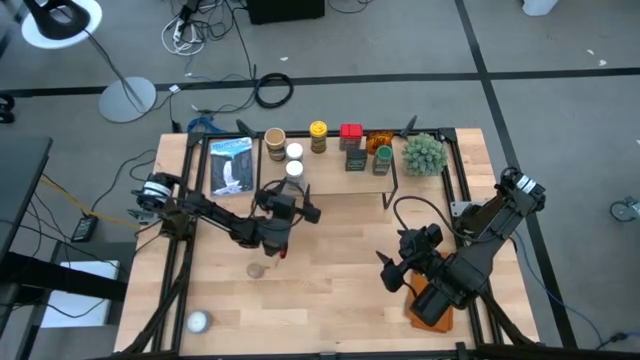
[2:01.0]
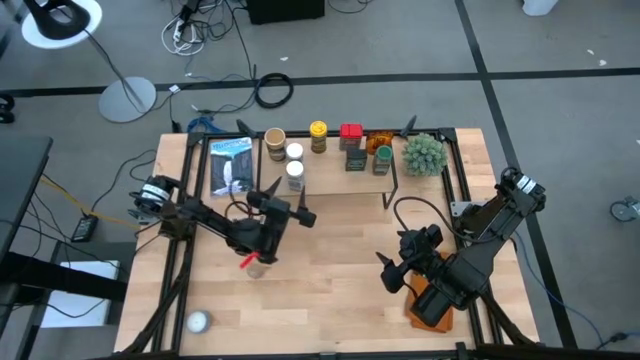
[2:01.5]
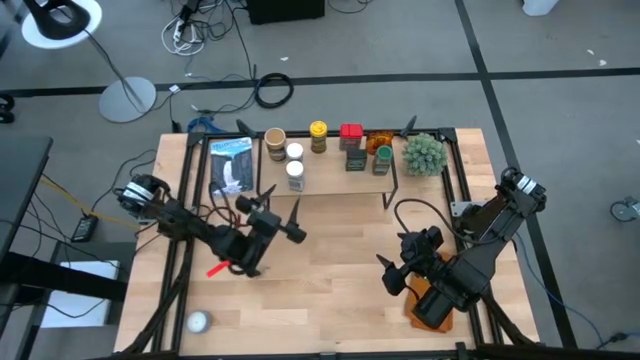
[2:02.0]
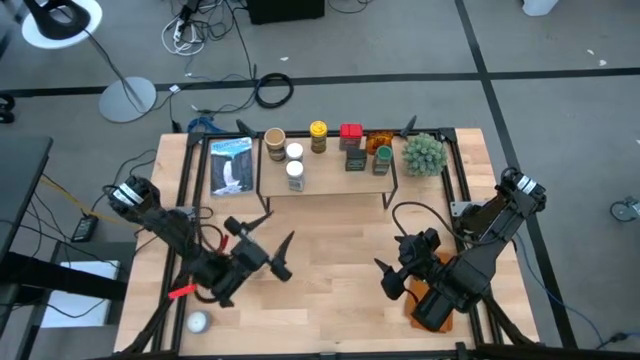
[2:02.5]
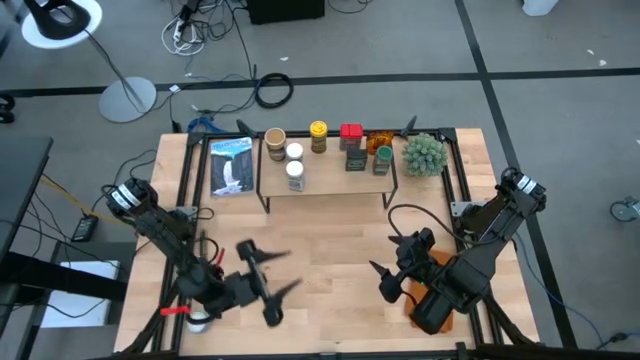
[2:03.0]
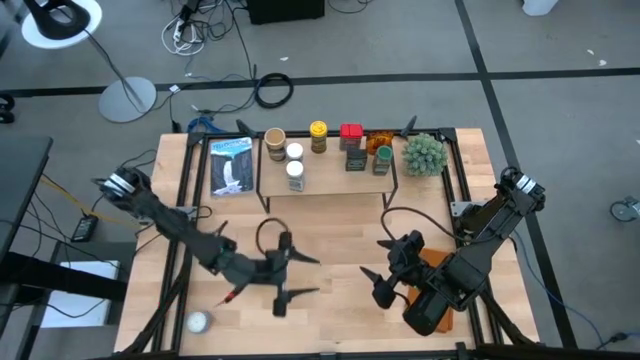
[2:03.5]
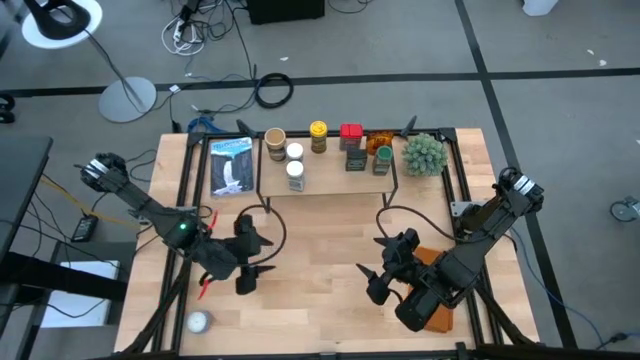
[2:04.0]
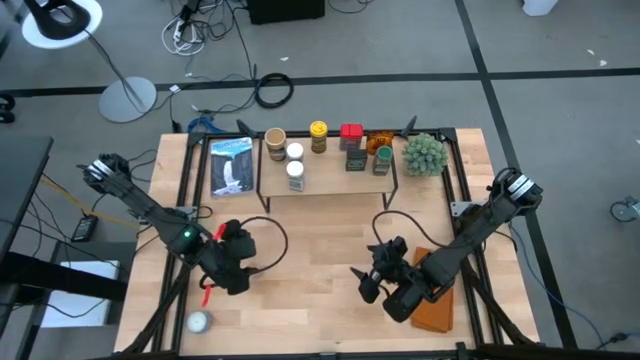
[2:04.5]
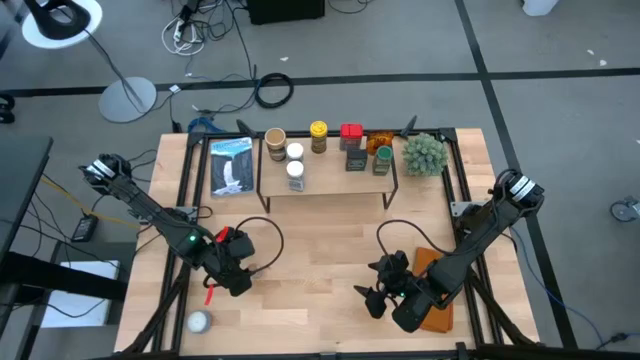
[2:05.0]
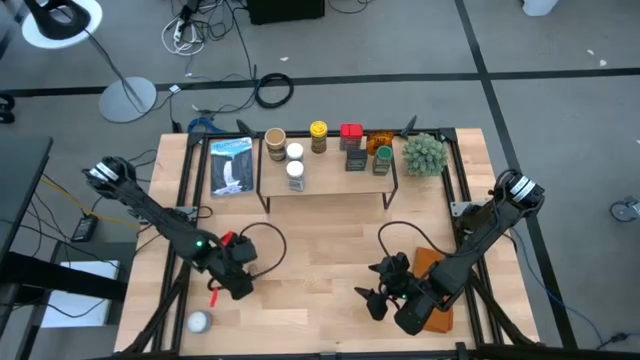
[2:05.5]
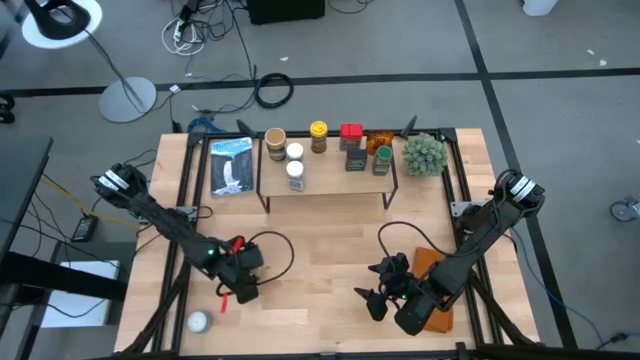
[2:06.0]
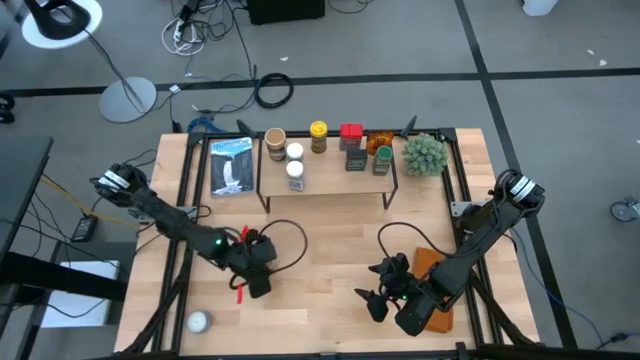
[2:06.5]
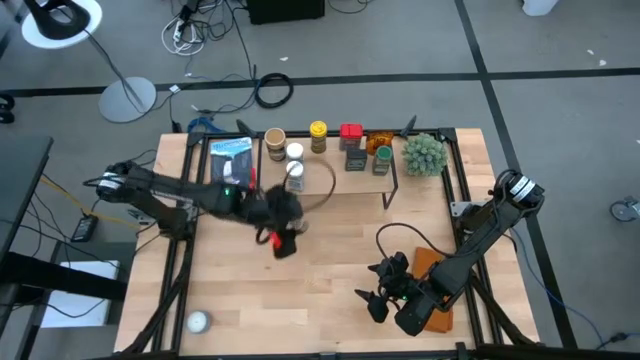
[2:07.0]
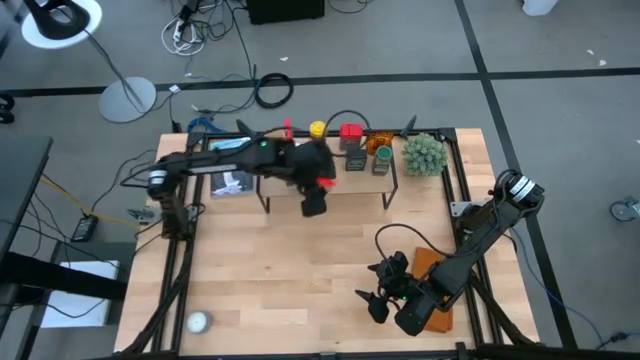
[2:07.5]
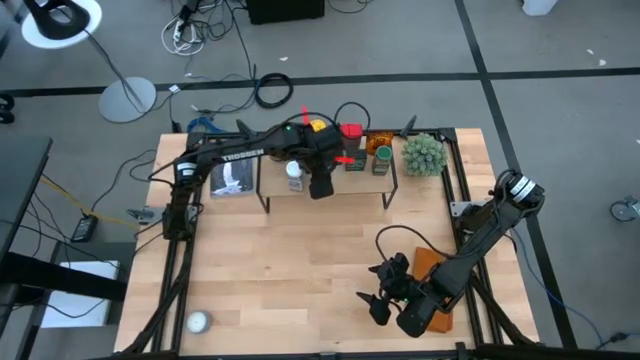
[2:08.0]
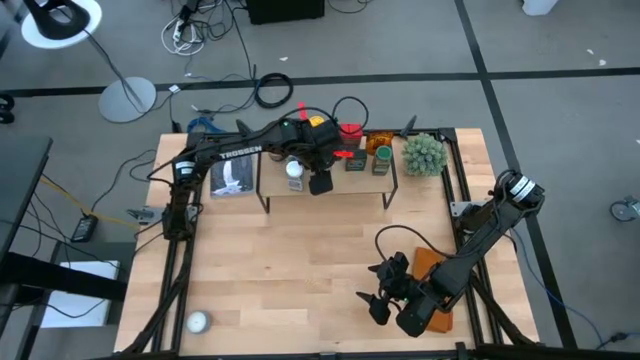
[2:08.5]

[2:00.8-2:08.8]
Task: Shelf spices
Put the brown seasoning bottle on the shelf

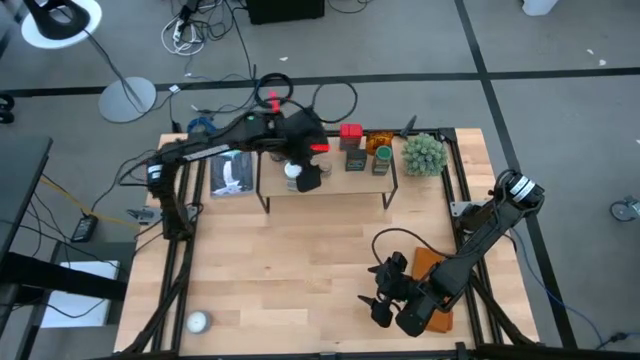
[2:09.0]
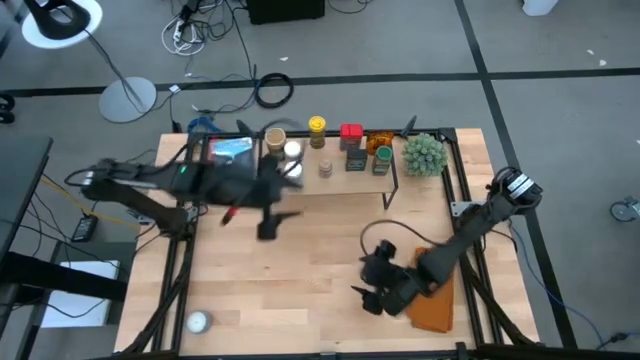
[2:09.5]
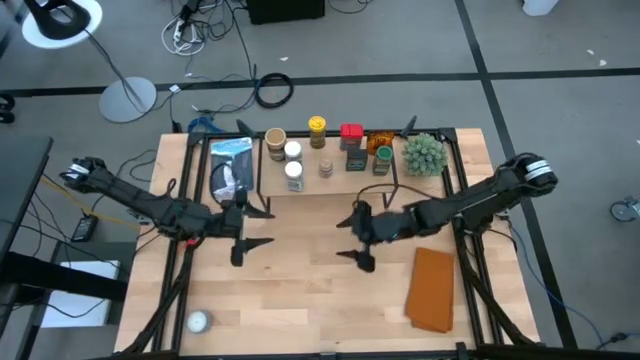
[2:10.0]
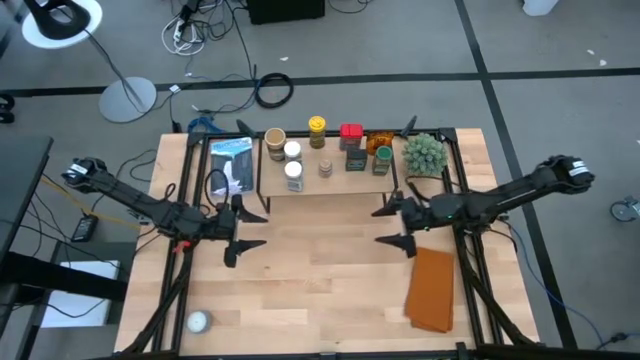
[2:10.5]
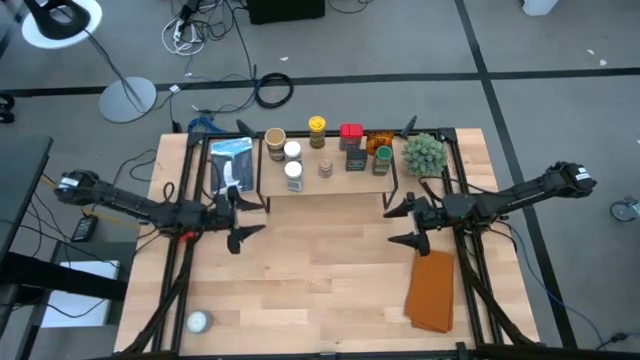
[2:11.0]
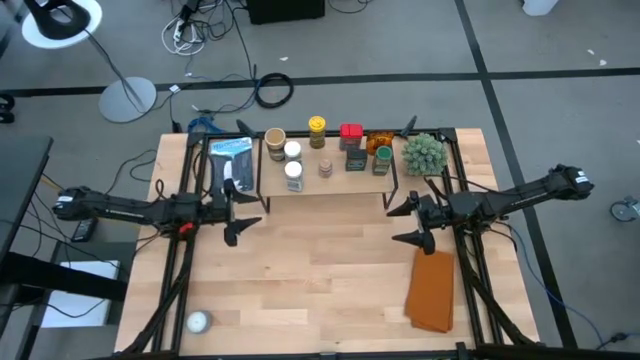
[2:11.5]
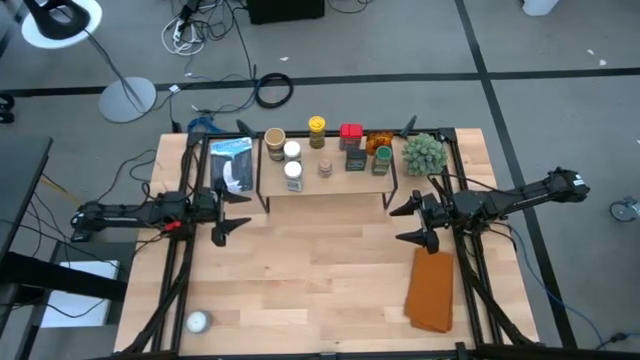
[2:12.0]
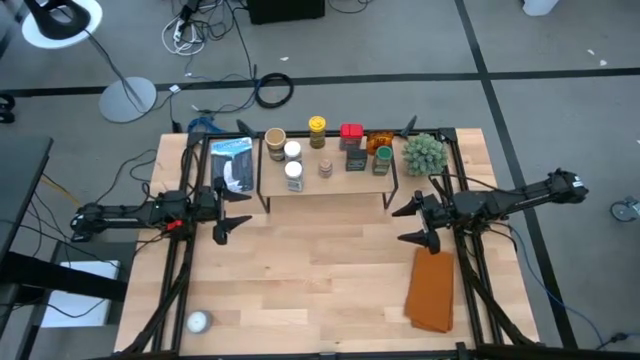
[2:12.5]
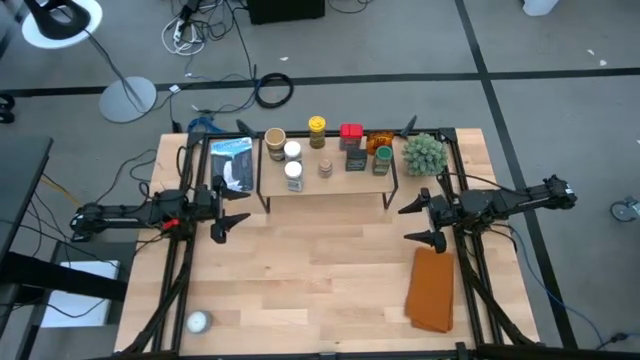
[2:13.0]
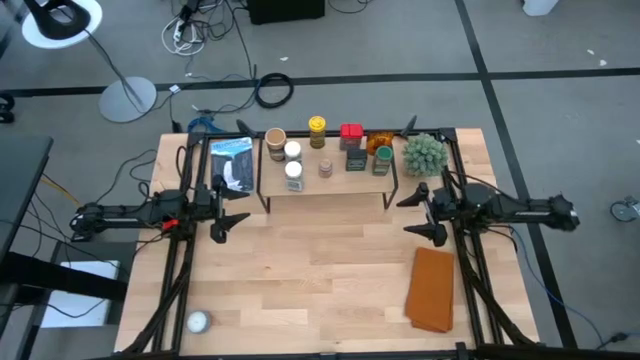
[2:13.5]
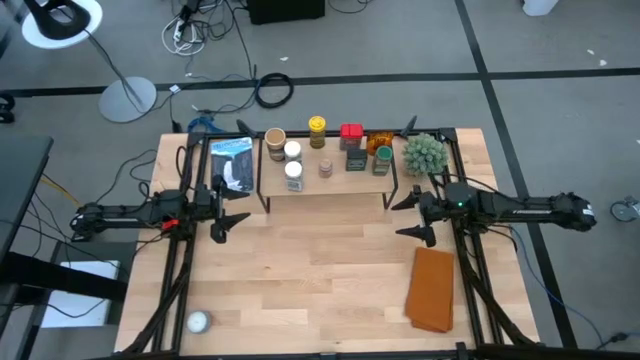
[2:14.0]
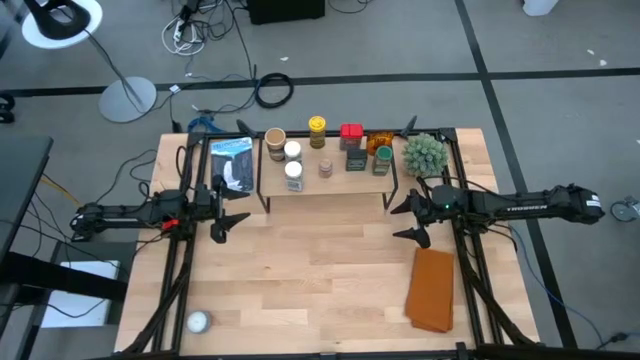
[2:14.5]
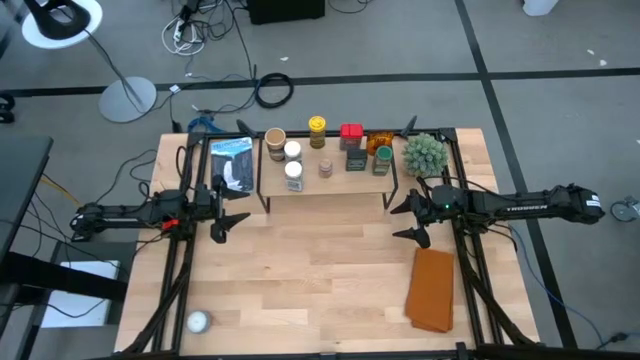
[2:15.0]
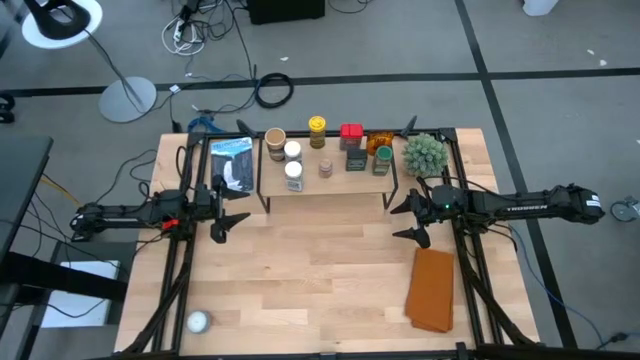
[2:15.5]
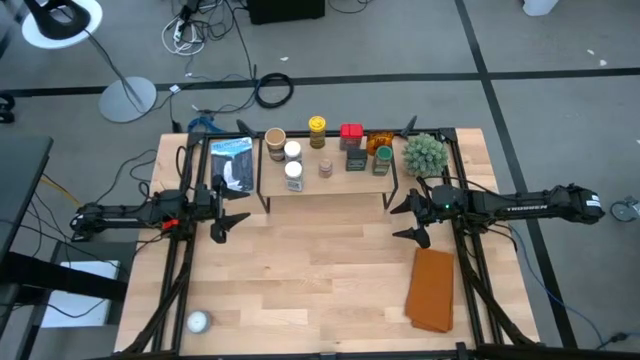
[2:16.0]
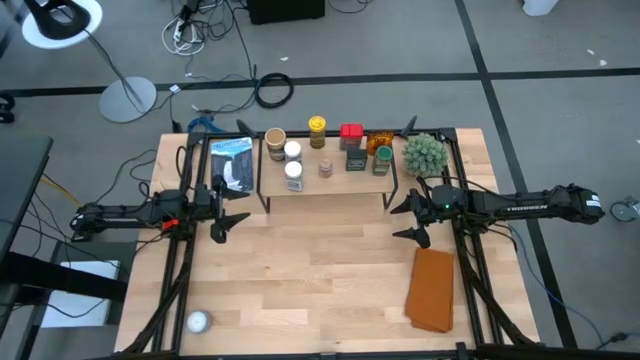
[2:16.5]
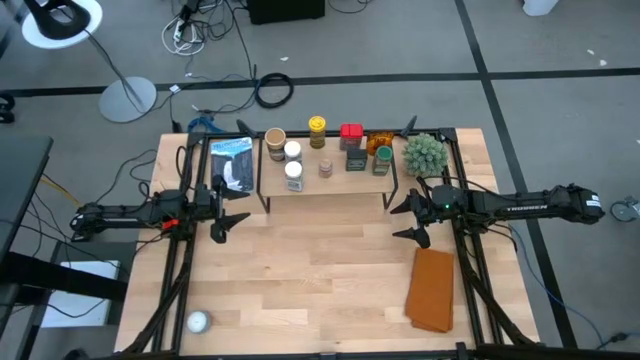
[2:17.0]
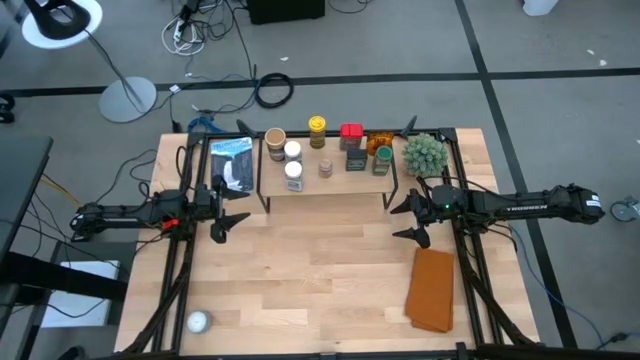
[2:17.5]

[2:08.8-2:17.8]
Return to Home Position

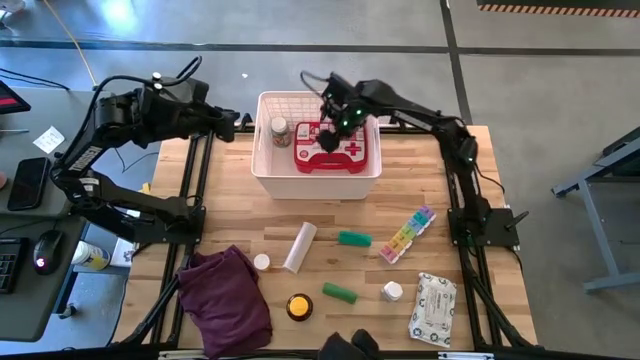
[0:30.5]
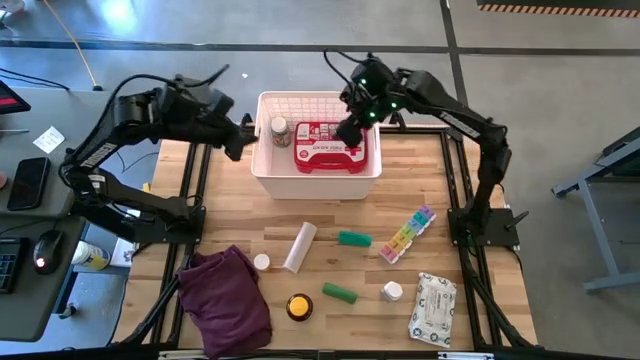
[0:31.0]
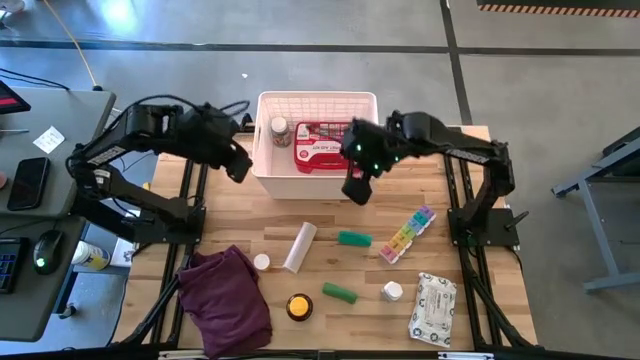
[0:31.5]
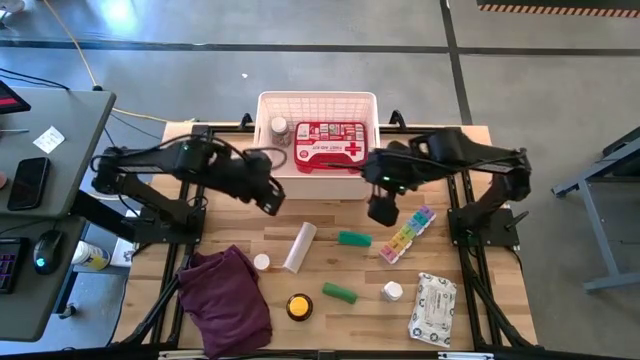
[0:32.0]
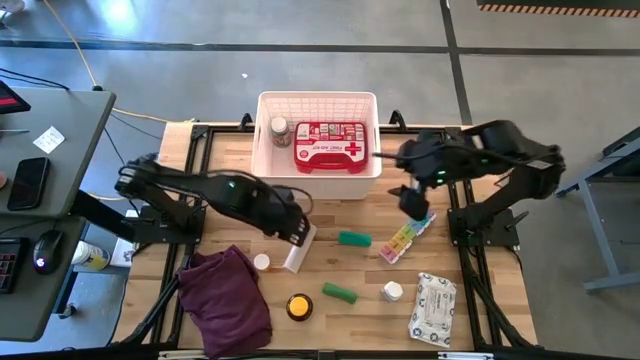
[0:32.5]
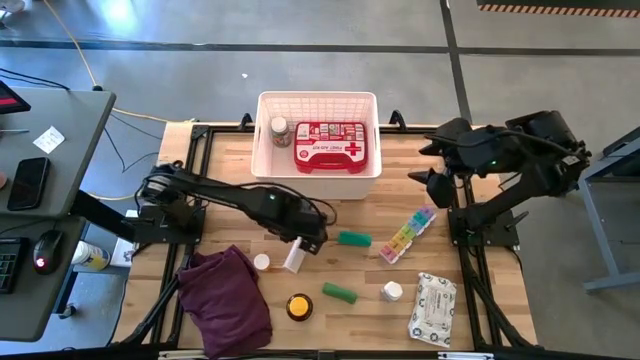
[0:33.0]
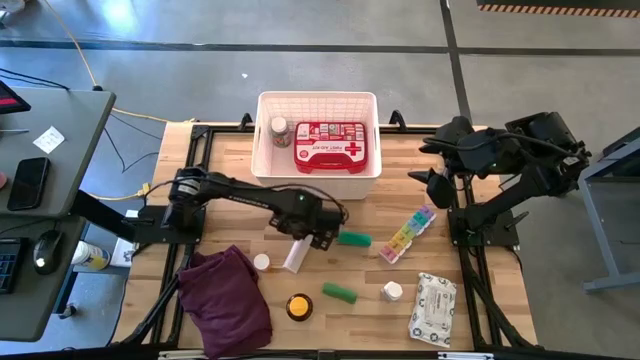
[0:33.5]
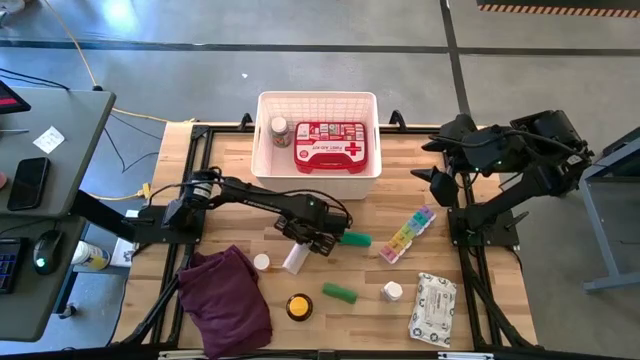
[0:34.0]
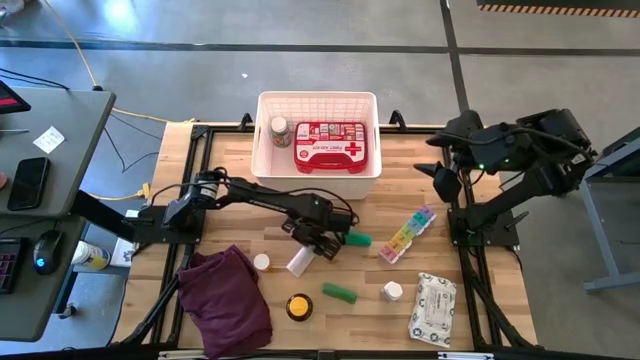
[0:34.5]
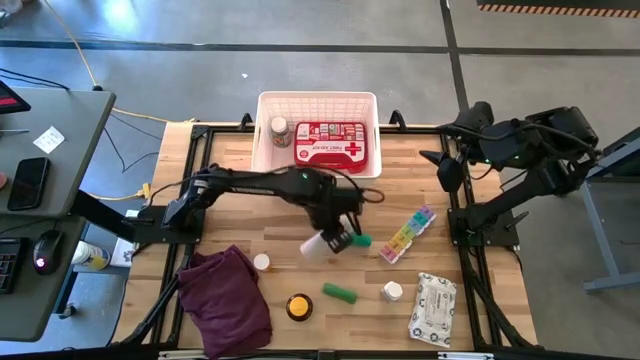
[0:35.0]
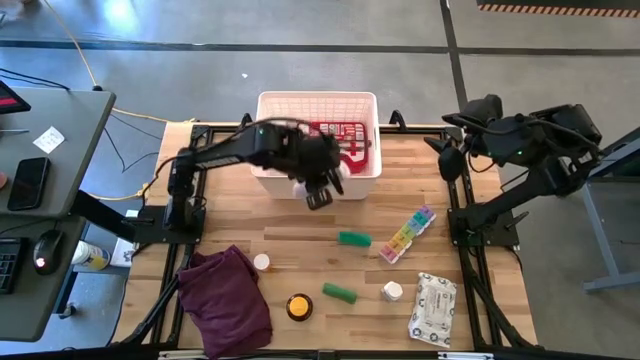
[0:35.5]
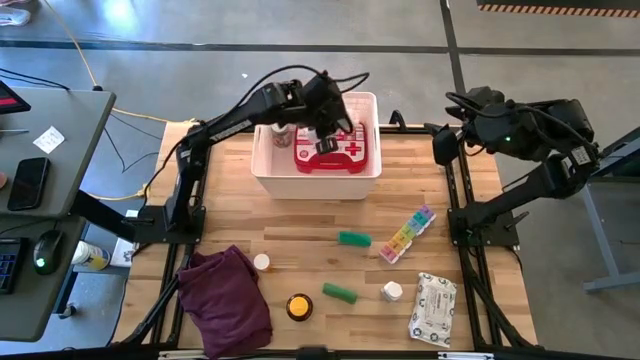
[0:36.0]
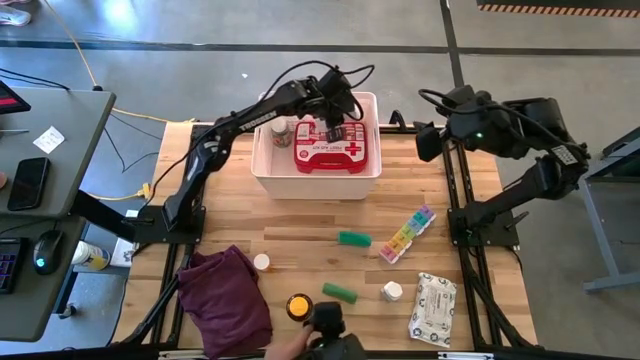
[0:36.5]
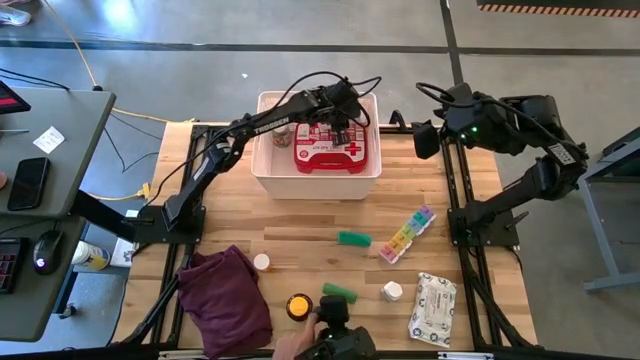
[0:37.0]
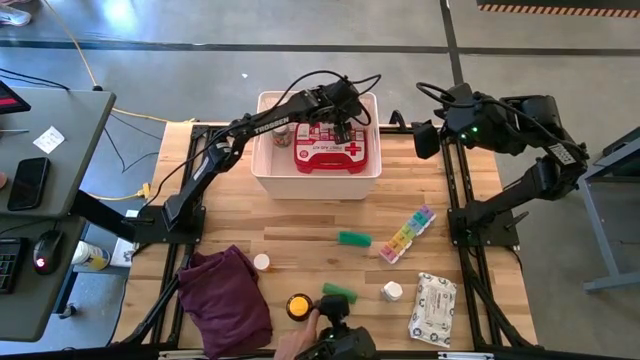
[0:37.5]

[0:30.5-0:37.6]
Task: Pick & place medical supplies in basket/bin
Put the white bandage into the white bin
